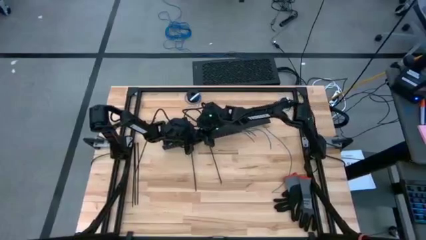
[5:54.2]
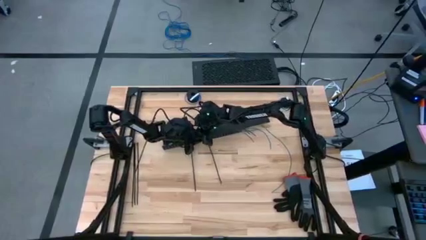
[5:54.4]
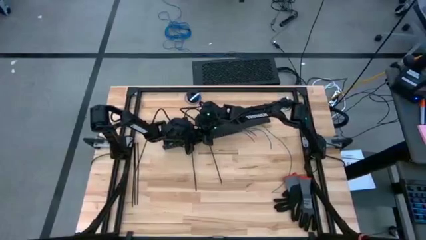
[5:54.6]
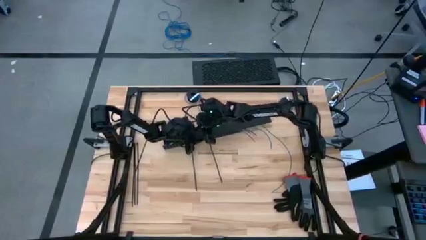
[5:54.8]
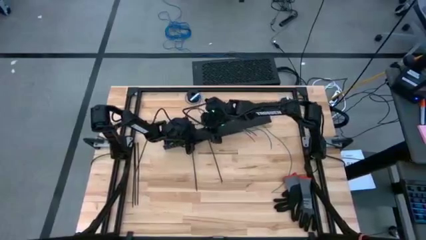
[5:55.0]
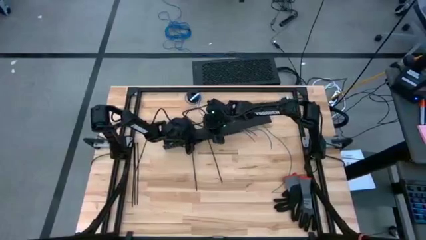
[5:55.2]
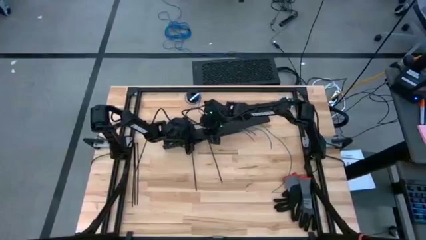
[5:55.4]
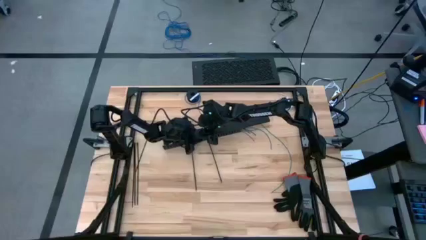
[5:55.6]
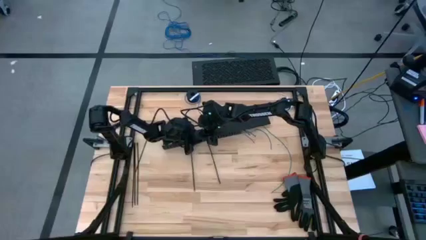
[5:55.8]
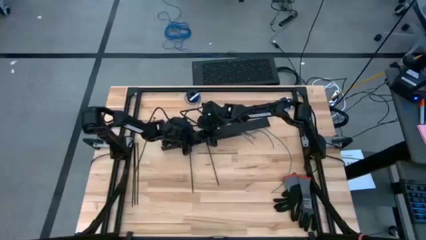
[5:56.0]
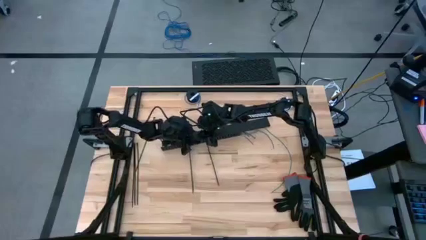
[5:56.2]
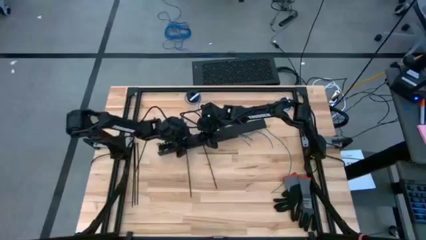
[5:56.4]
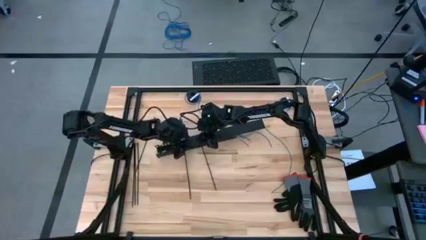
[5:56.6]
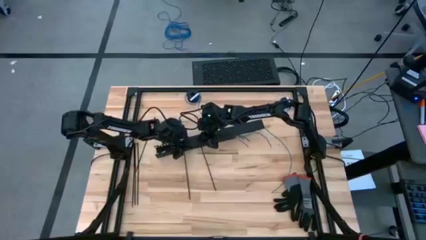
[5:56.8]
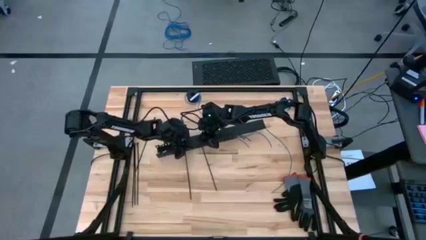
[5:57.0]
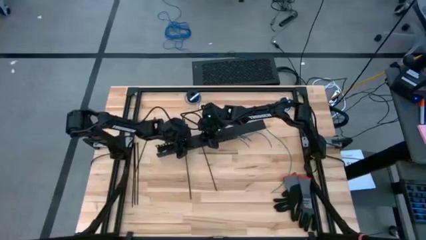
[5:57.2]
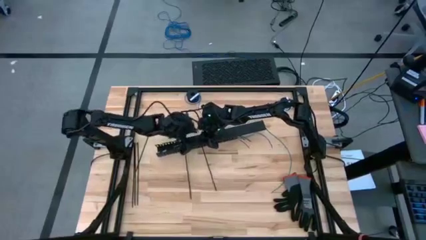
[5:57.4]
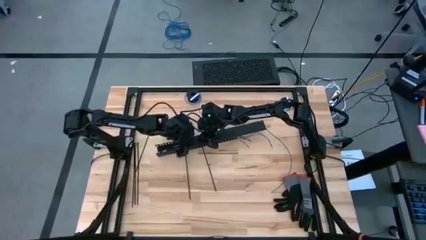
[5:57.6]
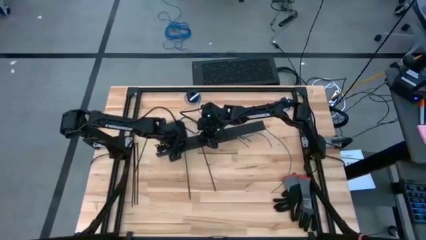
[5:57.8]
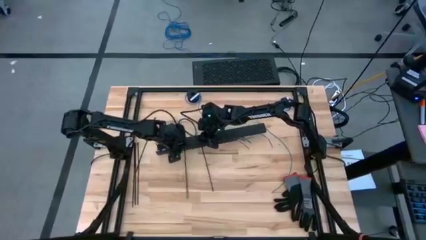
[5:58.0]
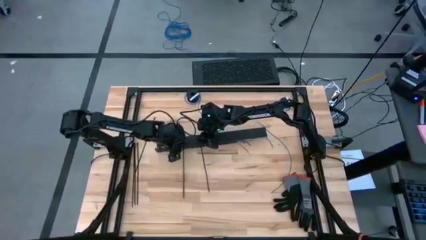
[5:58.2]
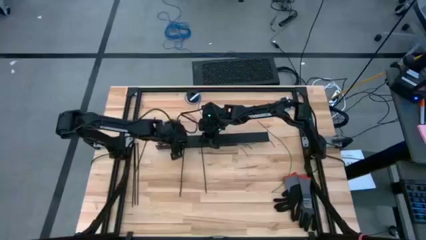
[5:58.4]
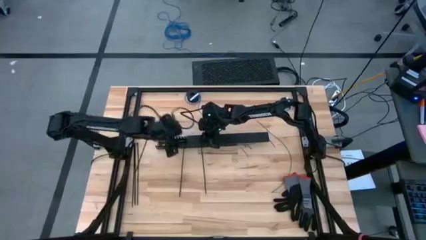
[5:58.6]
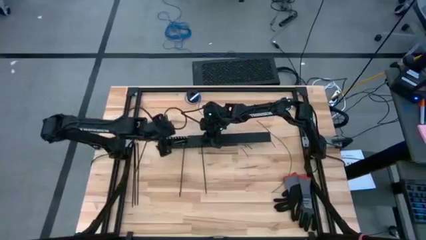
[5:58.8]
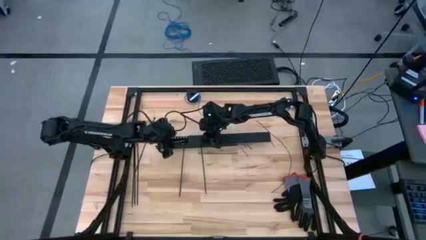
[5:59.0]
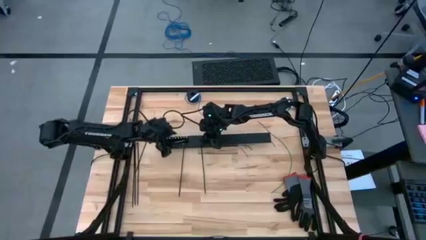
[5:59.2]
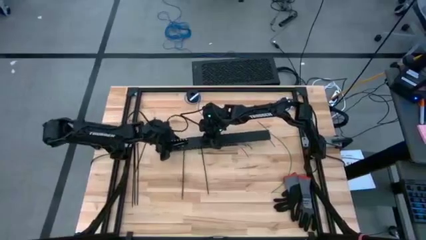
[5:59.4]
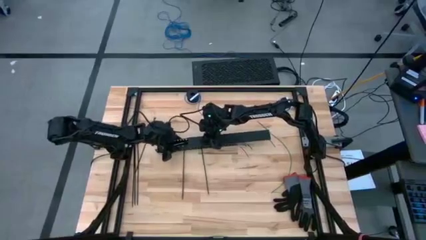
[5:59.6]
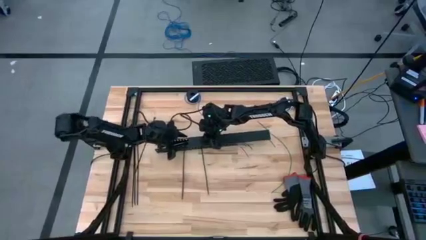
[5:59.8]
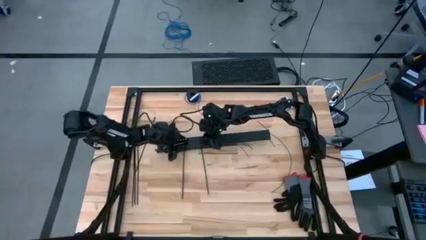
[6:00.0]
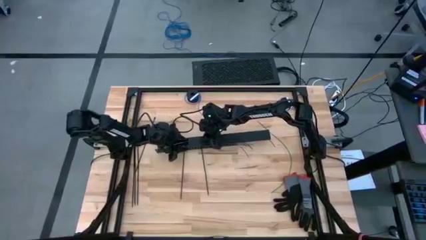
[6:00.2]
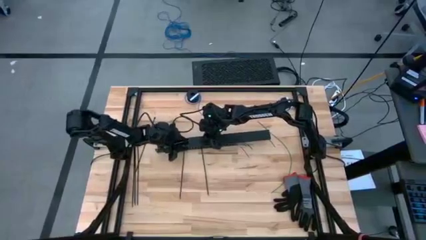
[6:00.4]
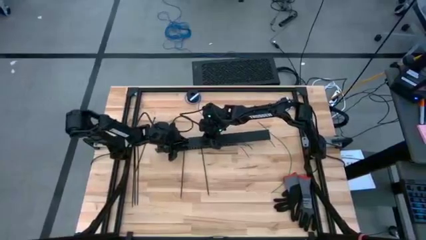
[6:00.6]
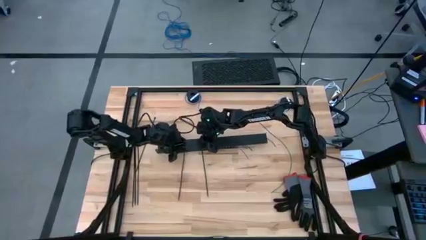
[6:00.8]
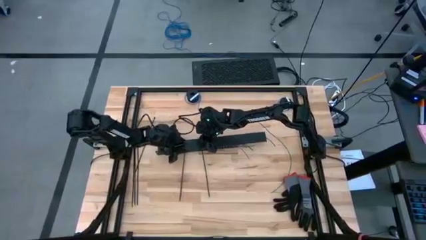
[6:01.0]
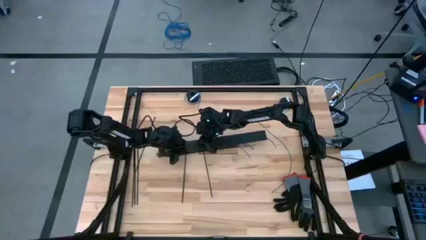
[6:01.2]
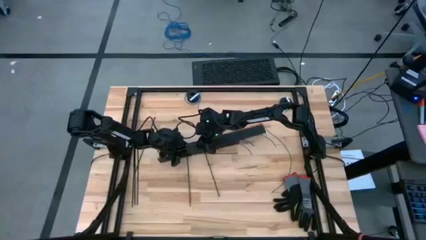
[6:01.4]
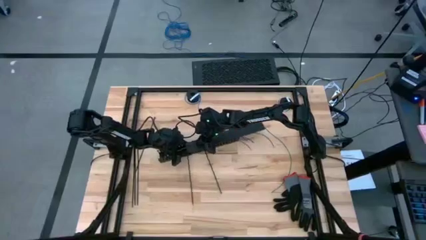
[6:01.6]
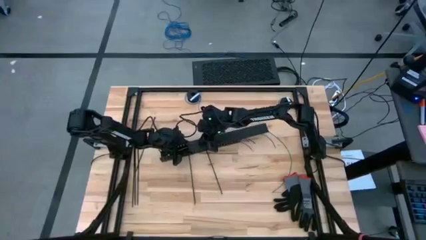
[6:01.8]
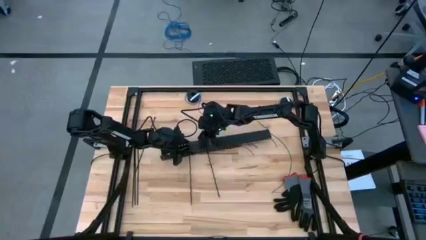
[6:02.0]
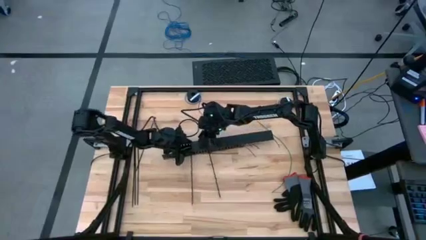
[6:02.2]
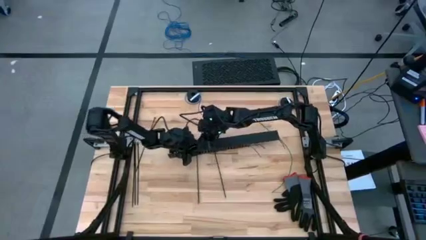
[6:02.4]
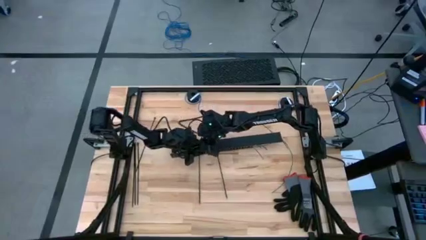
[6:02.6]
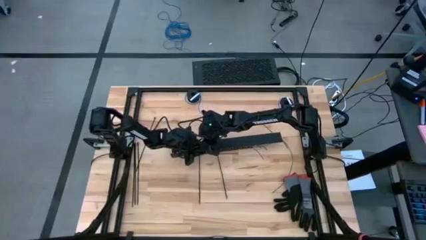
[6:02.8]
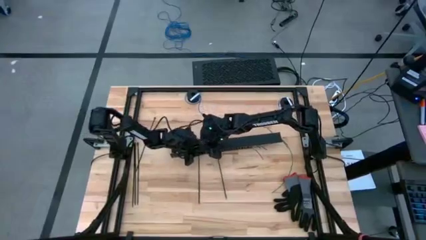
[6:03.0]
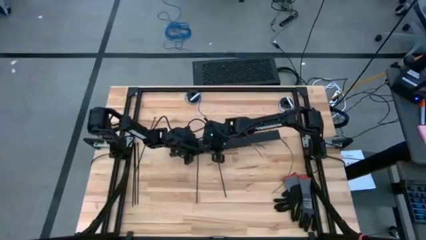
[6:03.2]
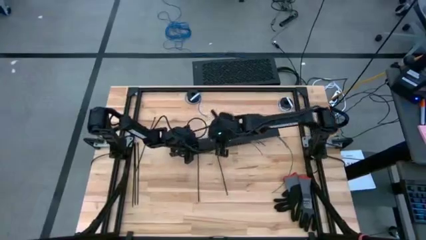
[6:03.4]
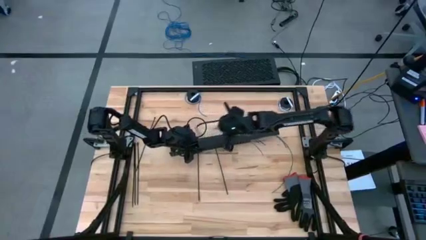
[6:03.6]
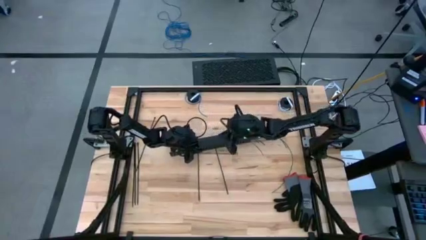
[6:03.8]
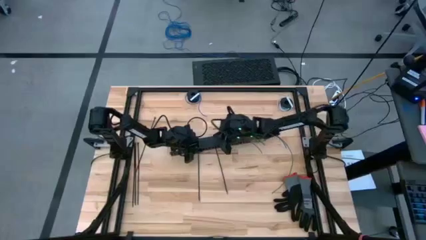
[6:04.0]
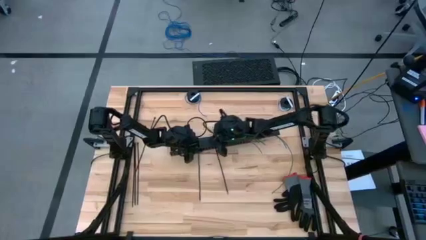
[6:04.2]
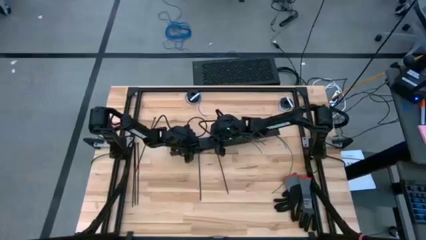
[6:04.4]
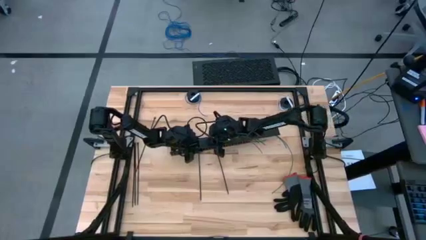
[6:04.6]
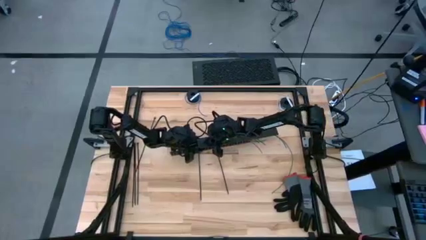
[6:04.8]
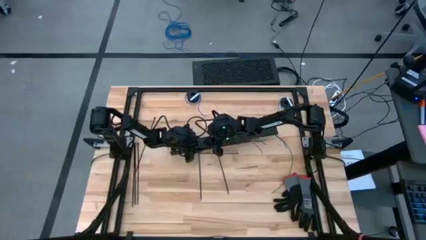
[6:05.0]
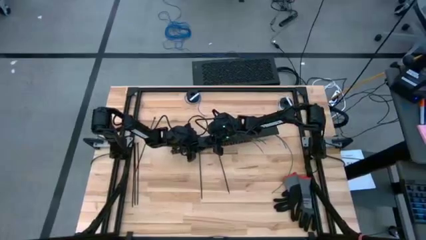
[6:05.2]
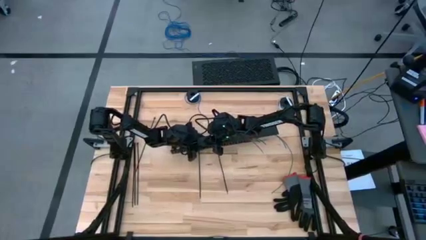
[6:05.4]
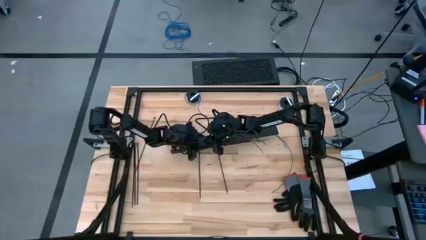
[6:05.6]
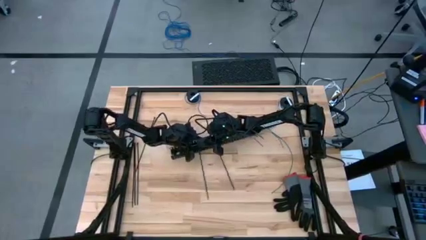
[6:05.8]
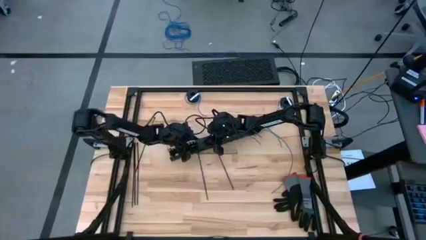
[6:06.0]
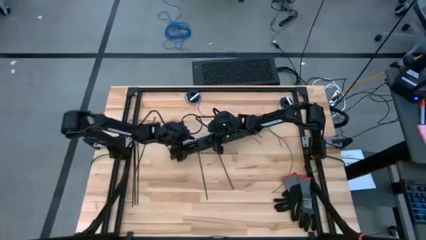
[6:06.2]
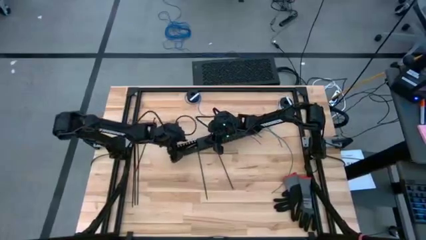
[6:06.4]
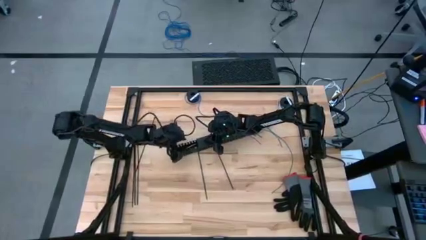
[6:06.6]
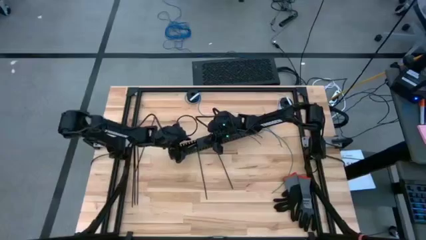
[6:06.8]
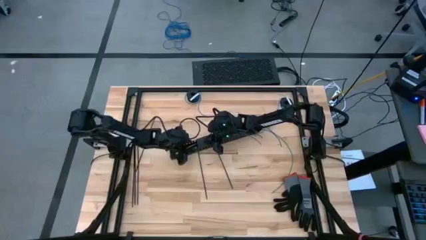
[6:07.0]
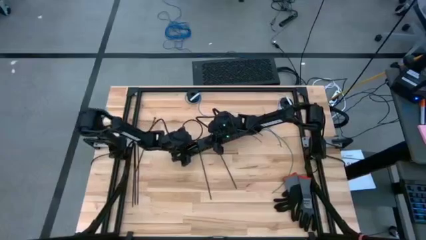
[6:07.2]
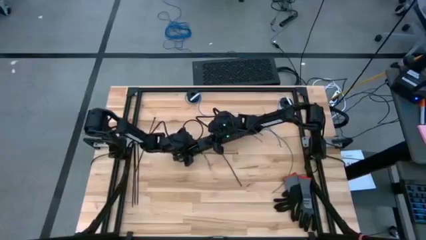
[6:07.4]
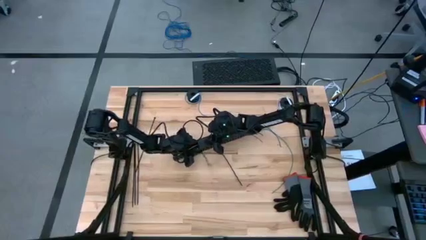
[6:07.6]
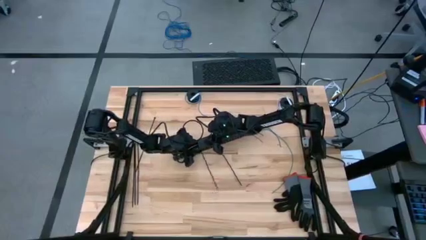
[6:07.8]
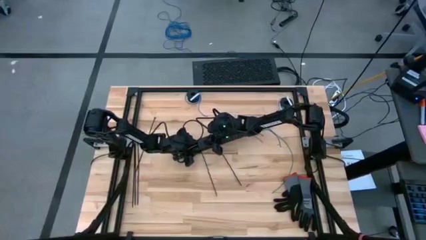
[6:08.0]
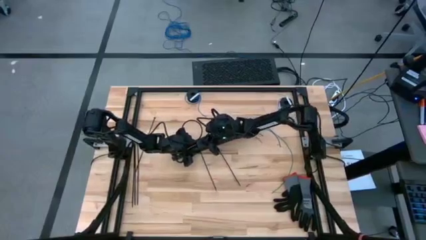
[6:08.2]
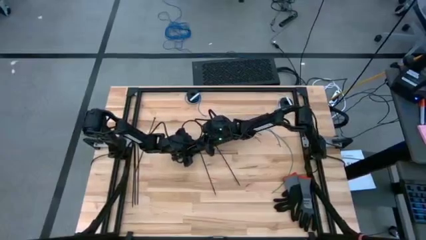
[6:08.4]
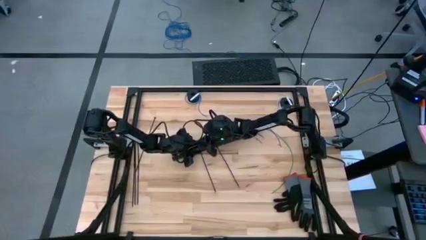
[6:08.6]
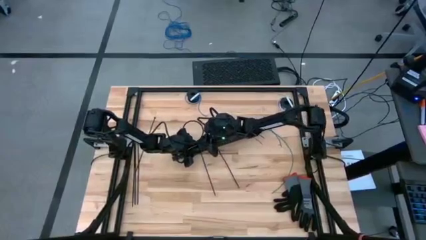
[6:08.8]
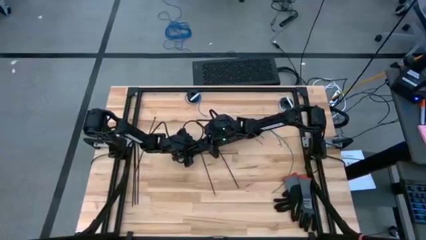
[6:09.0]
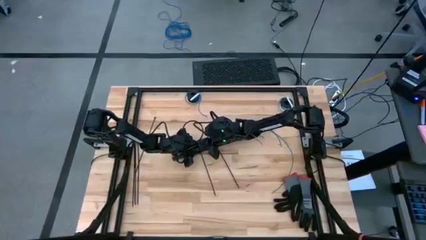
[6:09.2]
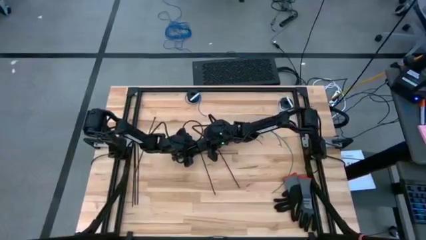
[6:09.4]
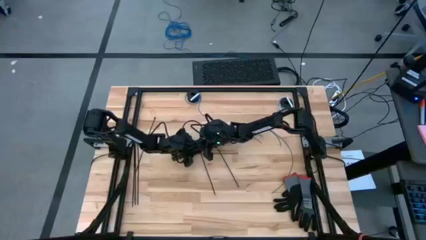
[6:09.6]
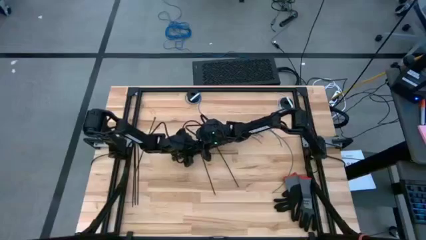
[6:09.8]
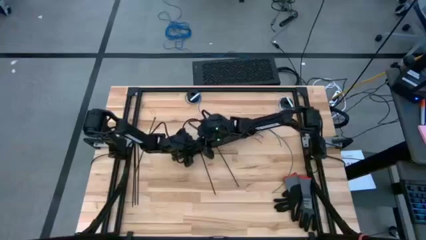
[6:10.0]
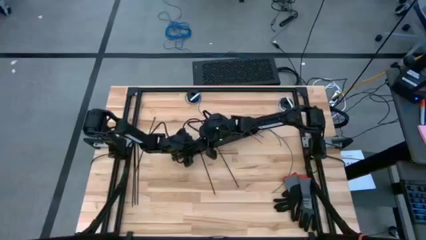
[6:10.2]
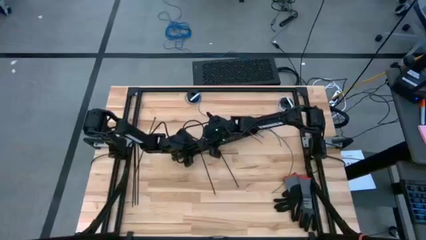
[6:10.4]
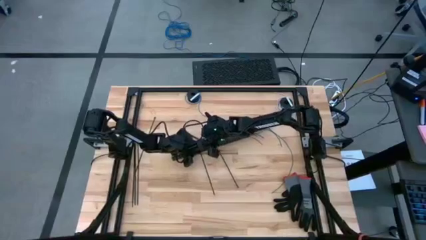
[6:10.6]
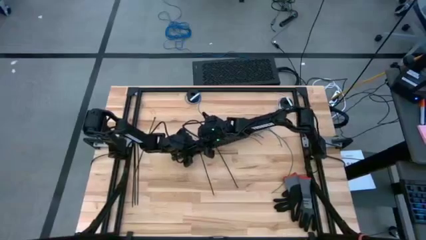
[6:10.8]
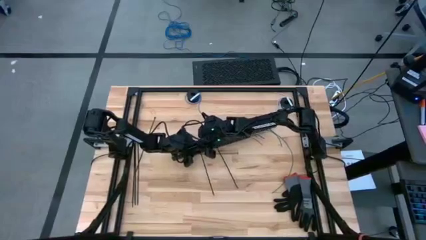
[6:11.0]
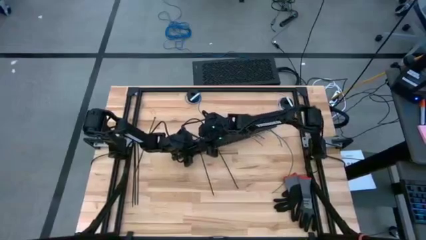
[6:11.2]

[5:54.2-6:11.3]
Task: Ziptie cables
Close the black cable duct
